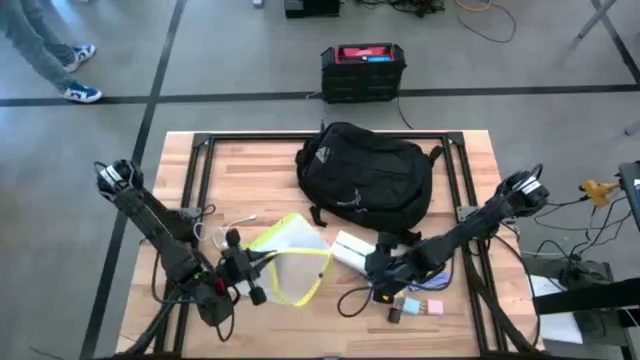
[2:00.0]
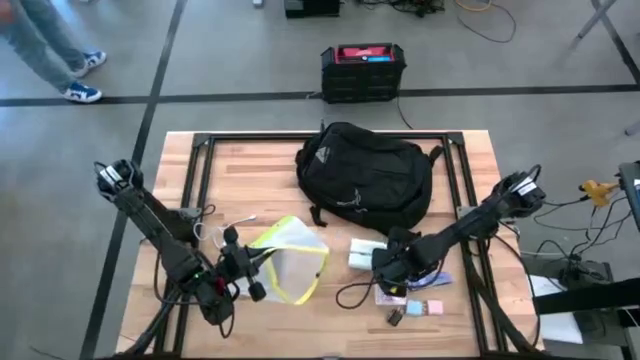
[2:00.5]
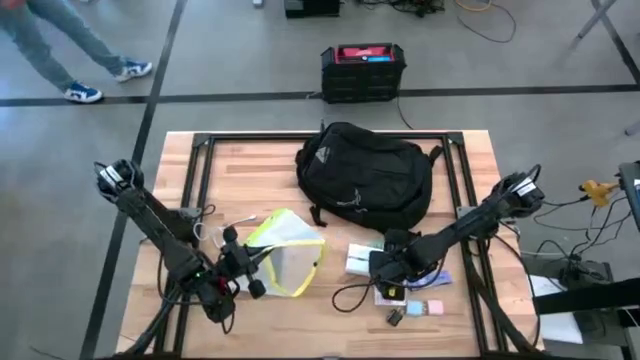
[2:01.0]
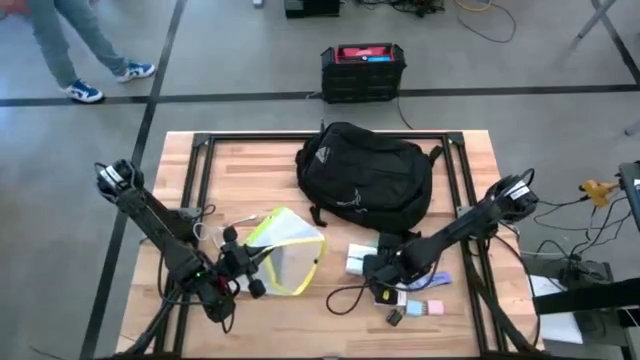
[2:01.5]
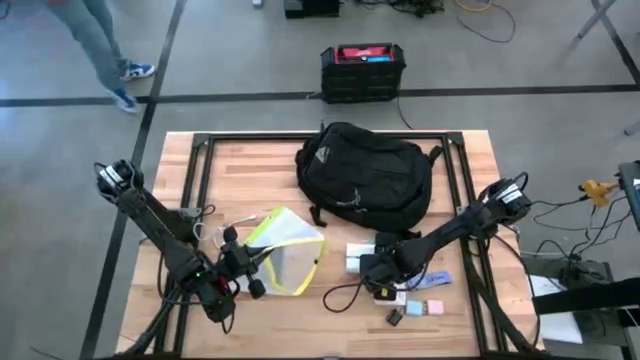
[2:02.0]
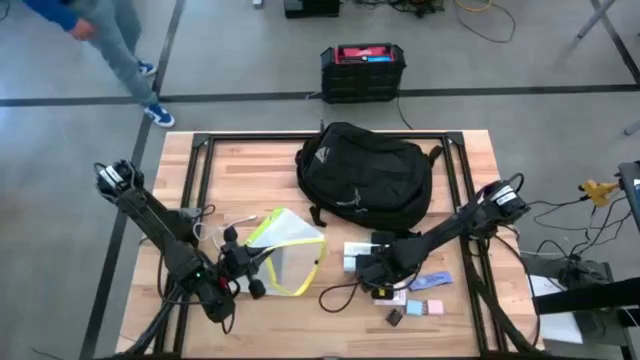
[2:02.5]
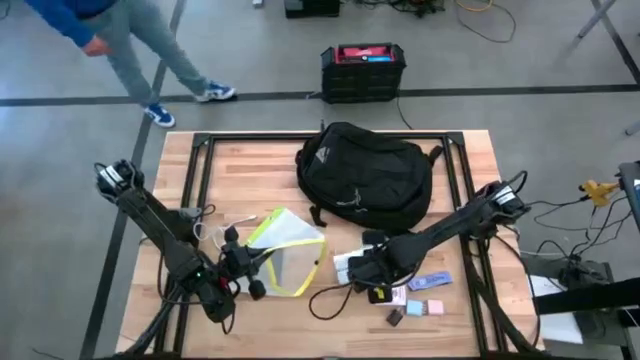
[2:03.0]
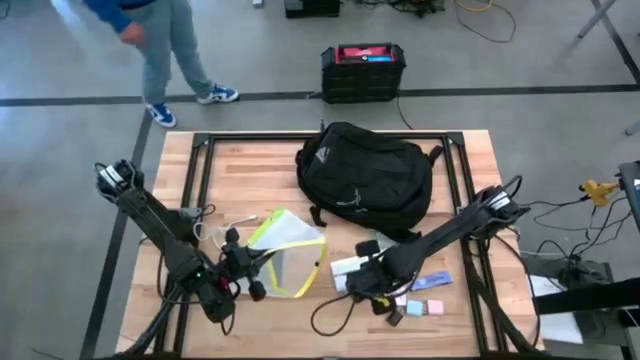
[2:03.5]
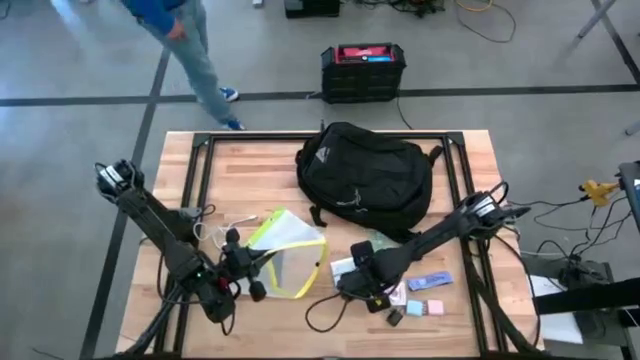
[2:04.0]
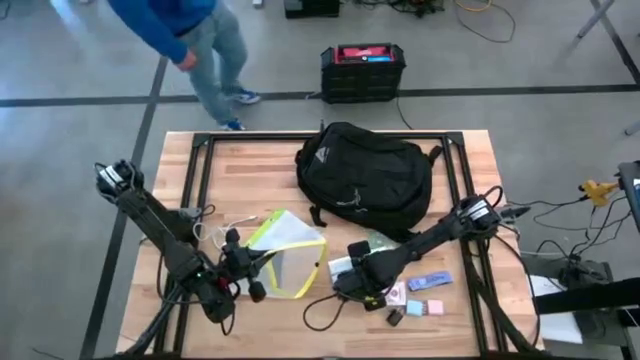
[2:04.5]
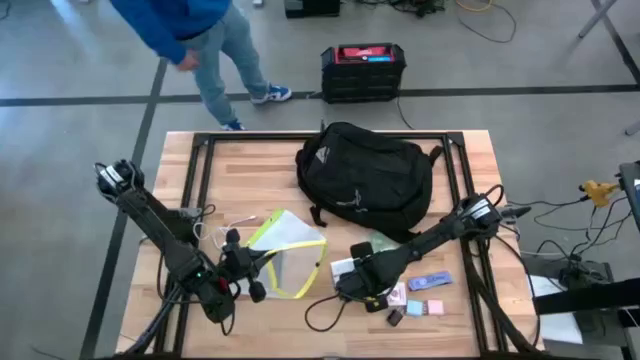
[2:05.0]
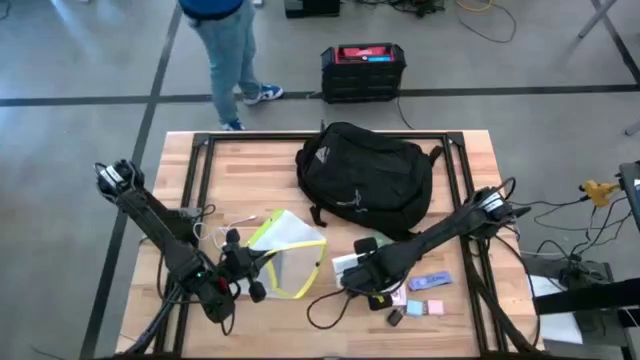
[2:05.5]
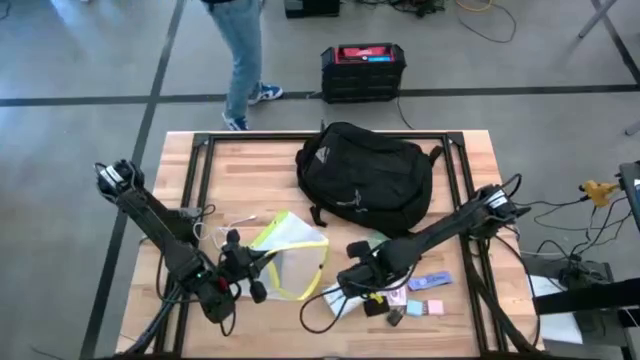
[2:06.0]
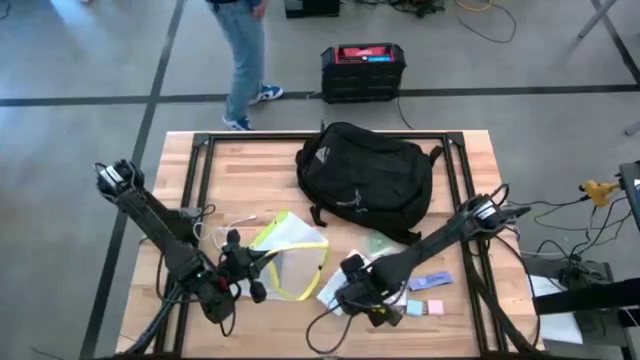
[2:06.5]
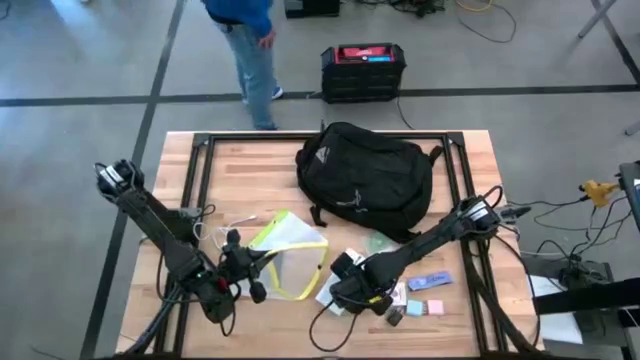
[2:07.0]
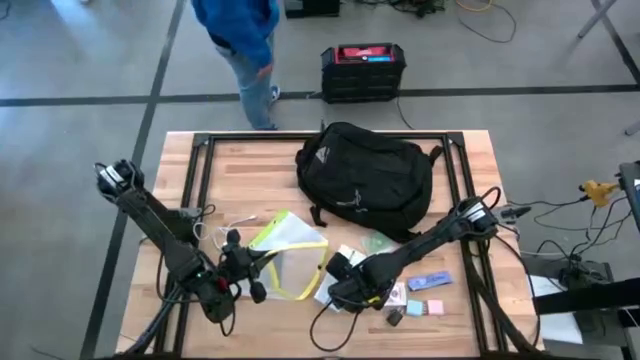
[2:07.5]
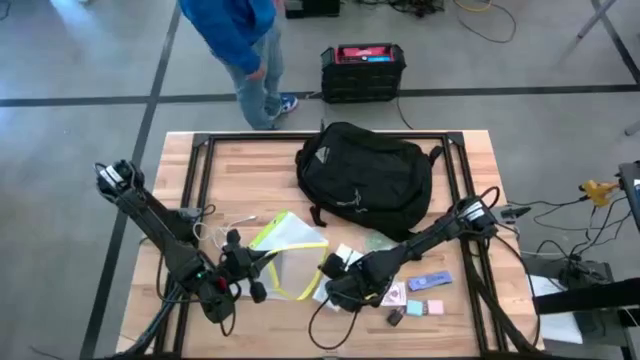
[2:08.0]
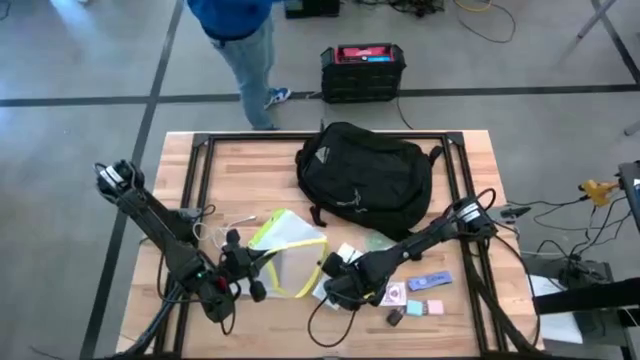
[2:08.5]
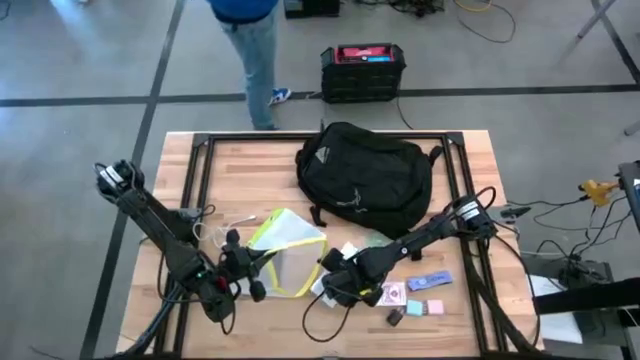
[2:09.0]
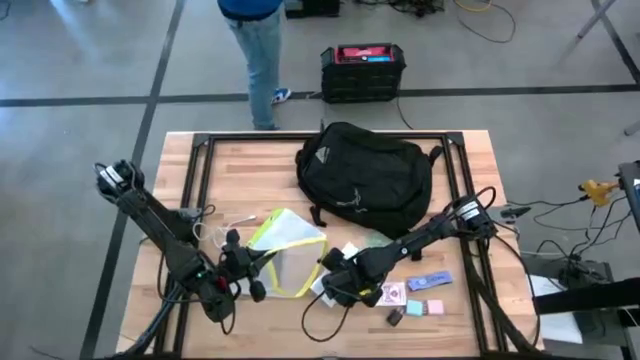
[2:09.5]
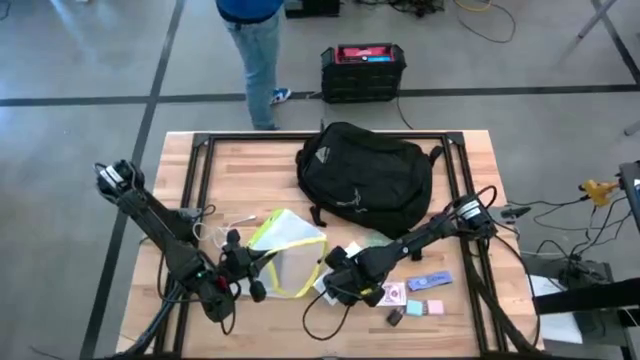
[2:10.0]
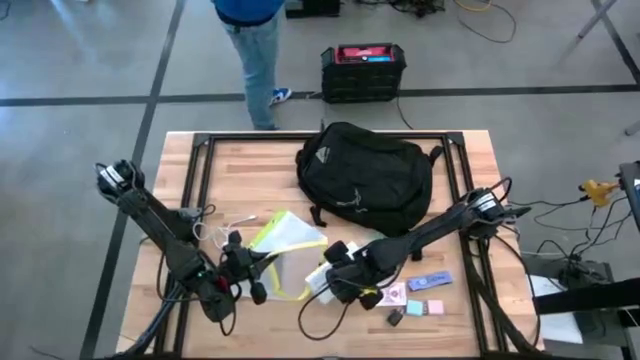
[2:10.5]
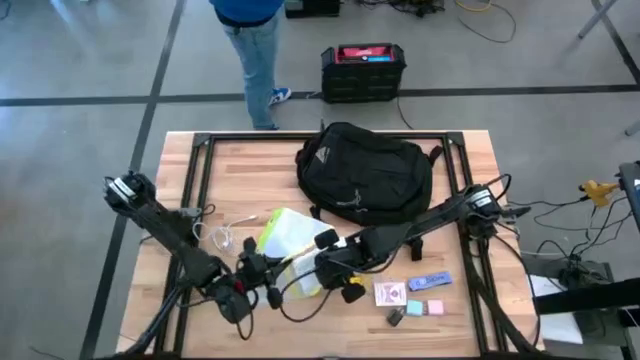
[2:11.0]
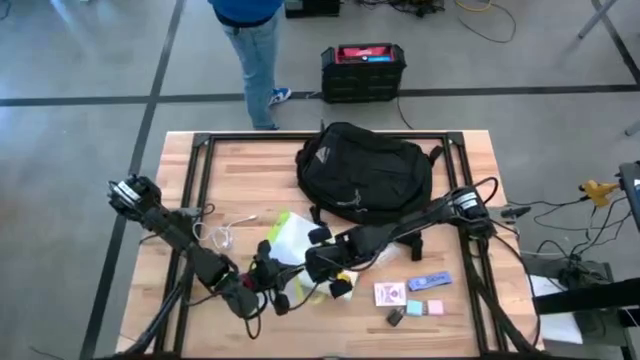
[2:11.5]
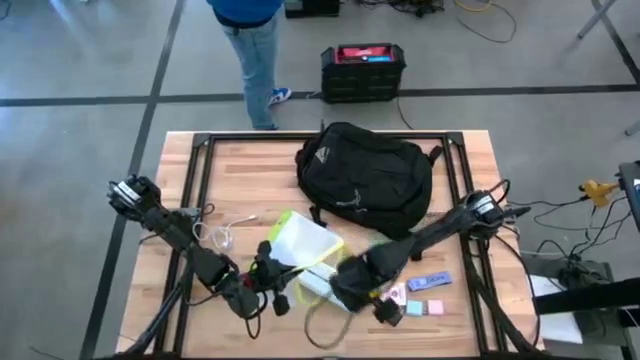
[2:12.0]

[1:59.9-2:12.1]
Task: Unpack backpack
Put the white medicine organizer into the yellow green zip bag

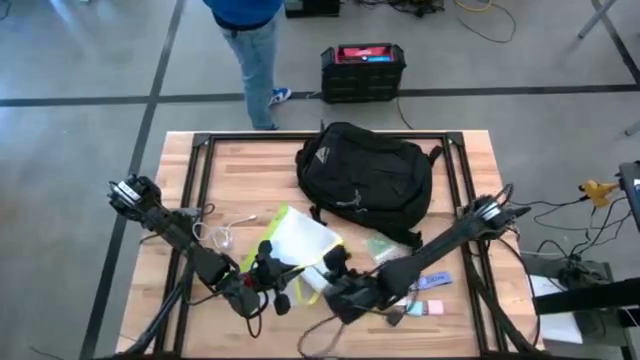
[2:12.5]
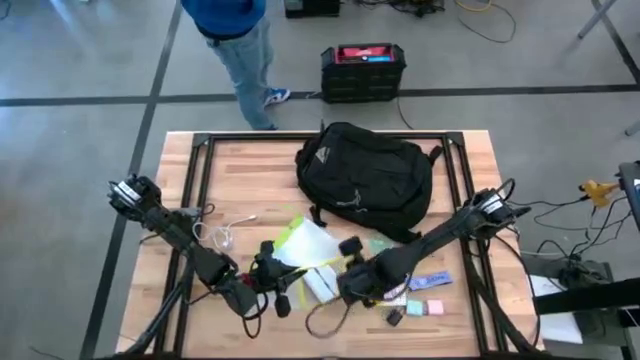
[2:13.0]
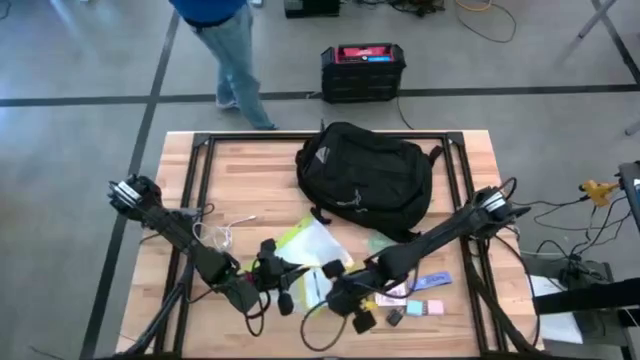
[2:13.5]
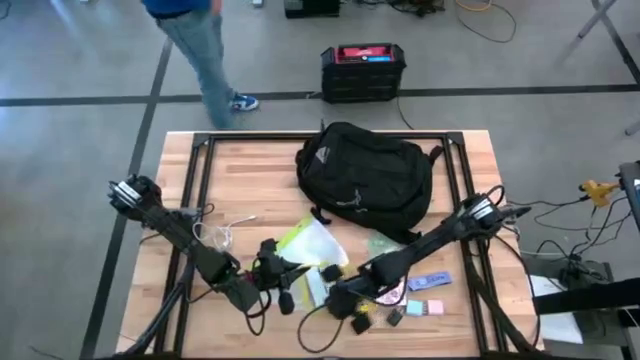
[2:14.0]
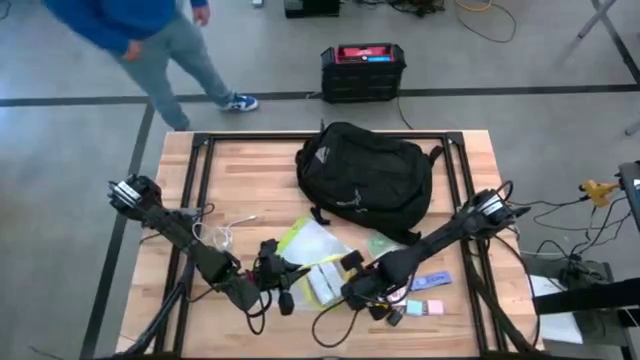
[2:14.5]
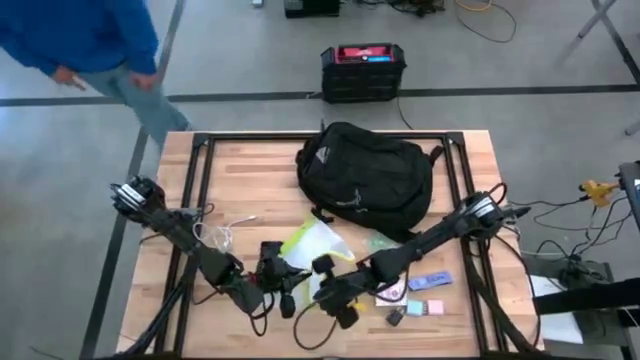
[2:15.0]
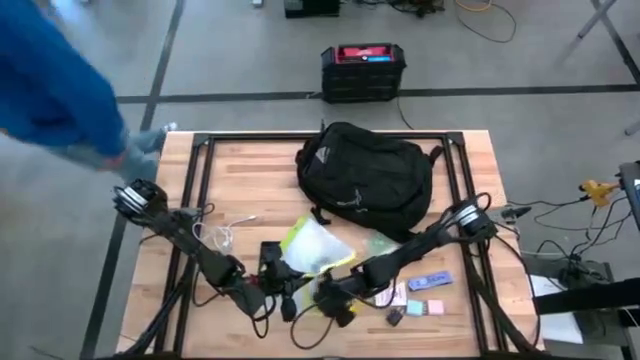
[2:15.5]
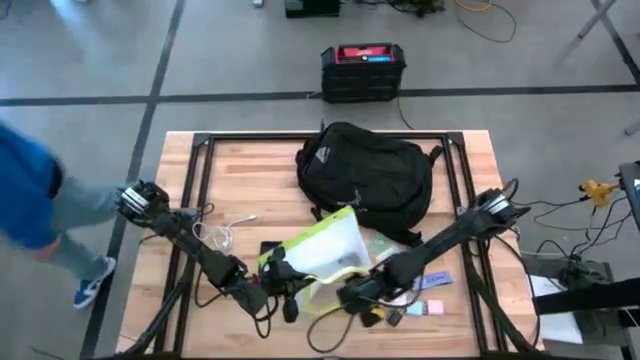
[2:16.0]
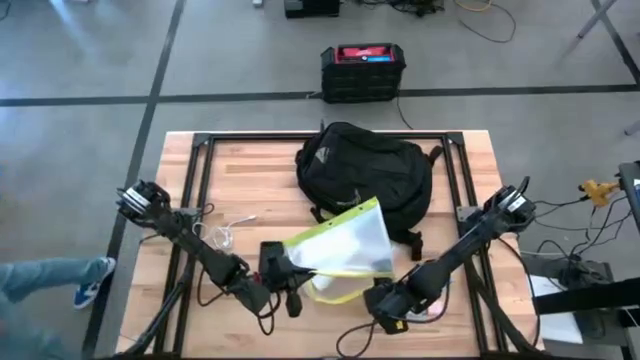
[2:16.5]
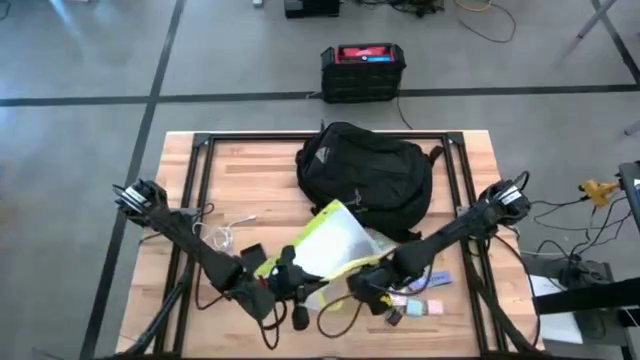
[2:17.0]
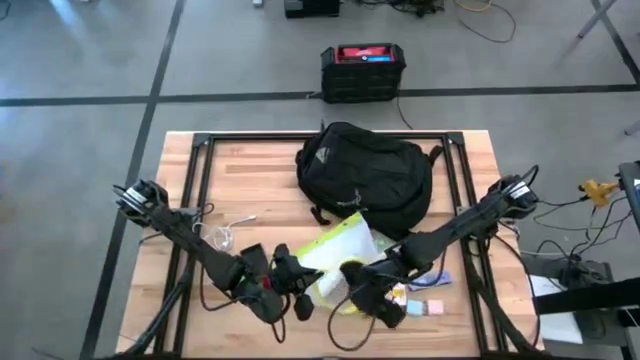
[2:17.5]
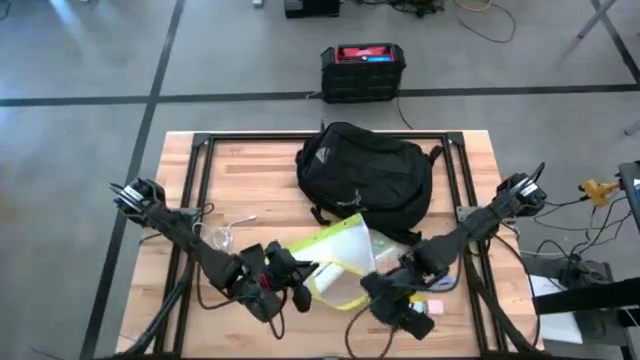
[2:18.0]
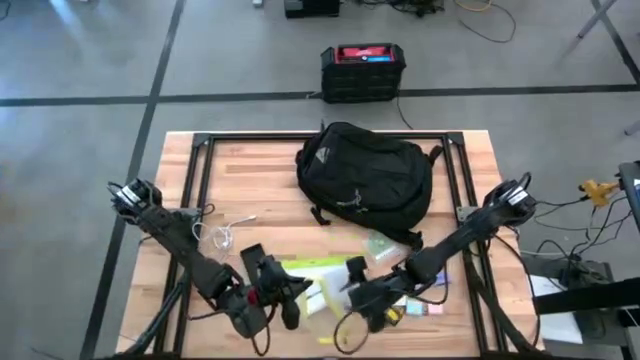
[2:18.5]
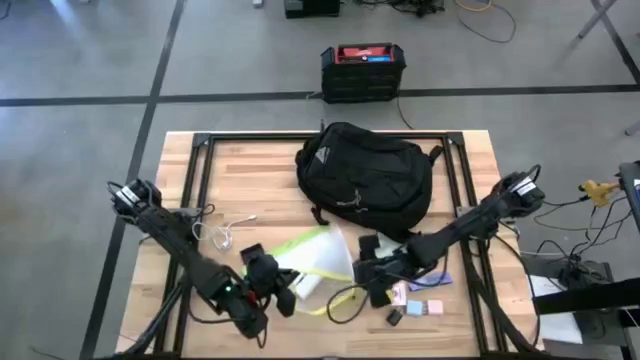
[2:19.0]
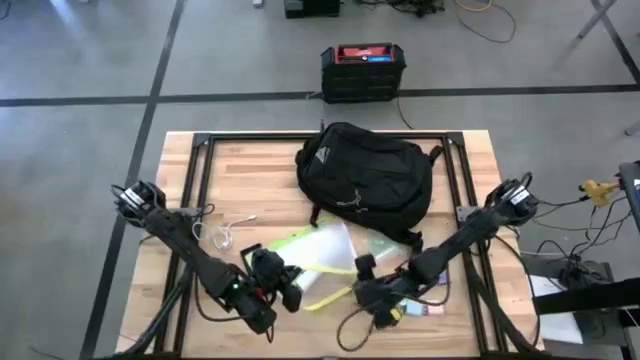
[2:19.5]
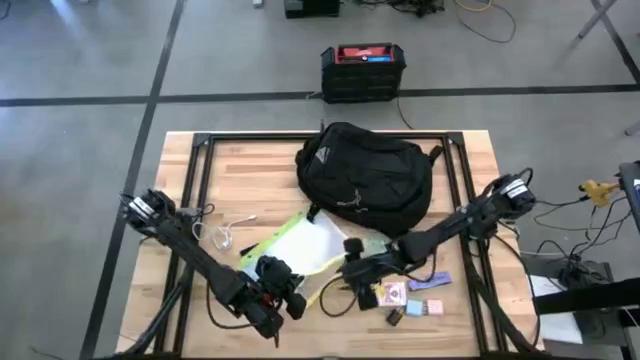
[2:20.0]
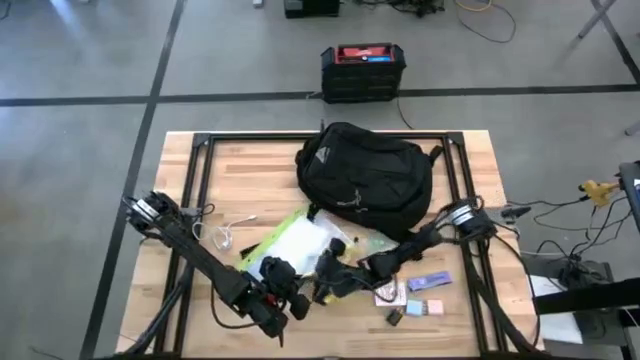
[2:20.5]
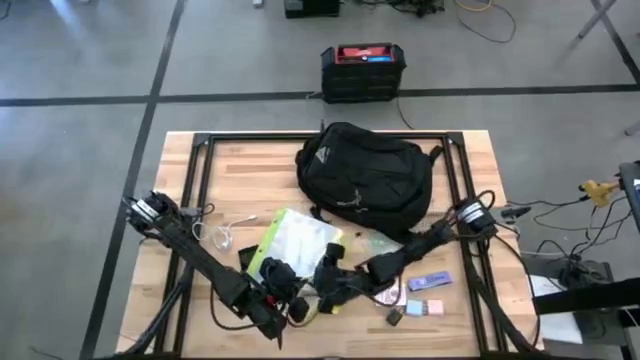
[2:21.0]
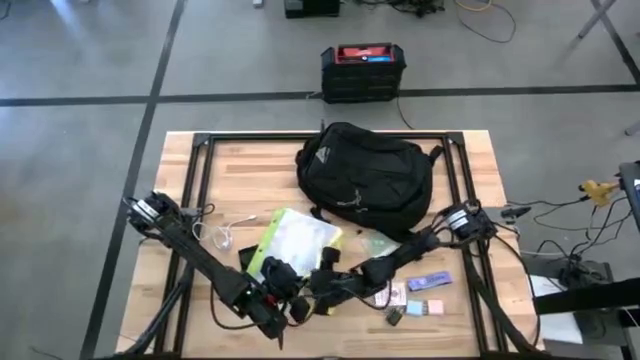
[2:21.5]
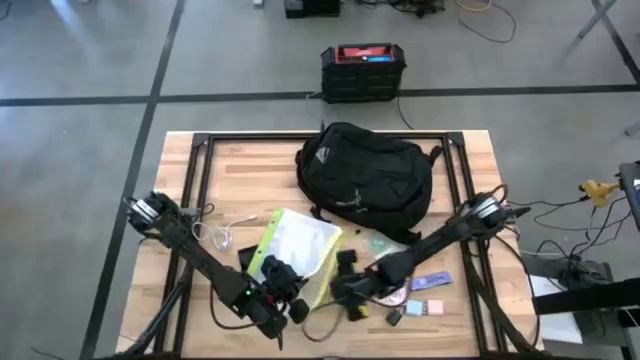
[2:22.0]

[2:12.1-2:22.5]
Put the white medicine organizer into the yellow green zip bag
